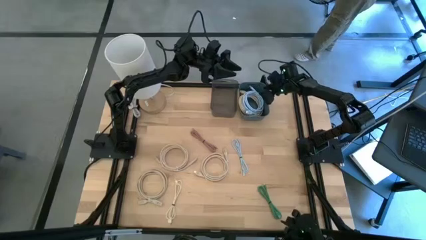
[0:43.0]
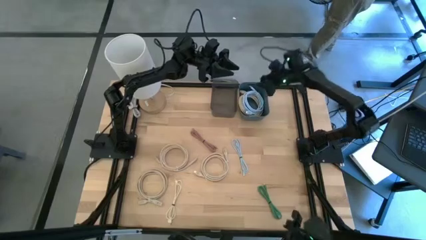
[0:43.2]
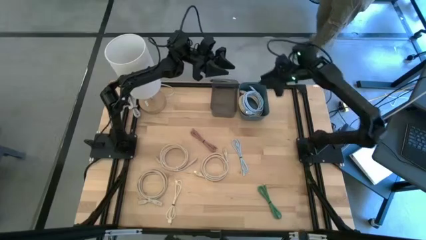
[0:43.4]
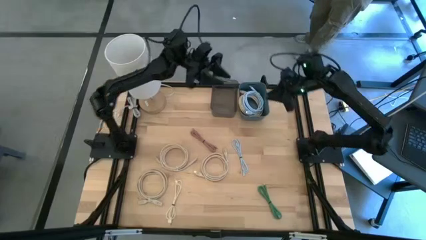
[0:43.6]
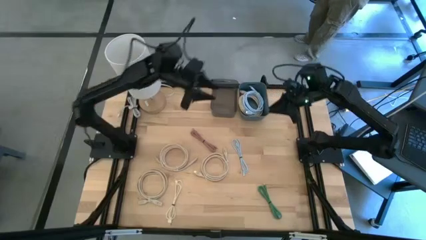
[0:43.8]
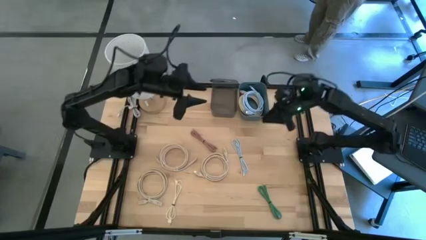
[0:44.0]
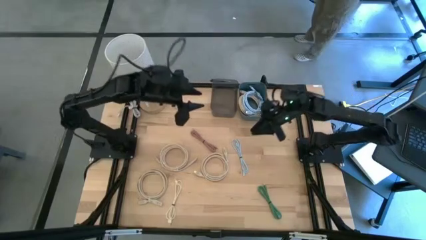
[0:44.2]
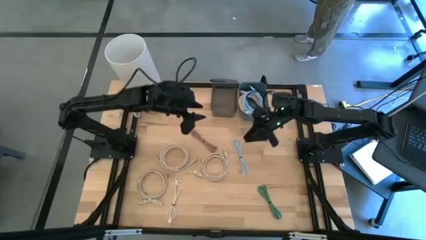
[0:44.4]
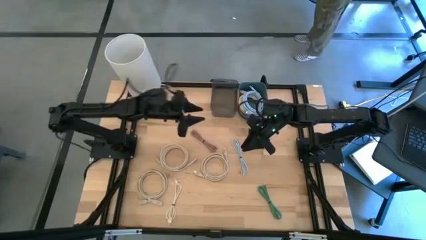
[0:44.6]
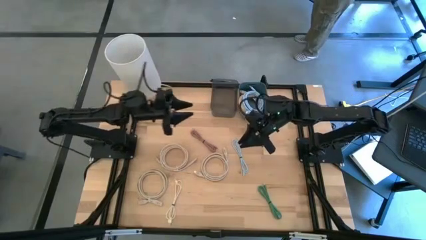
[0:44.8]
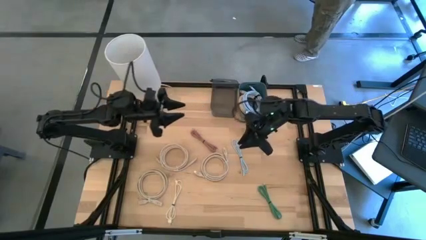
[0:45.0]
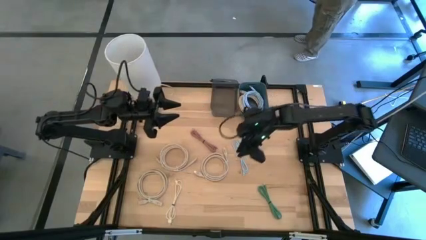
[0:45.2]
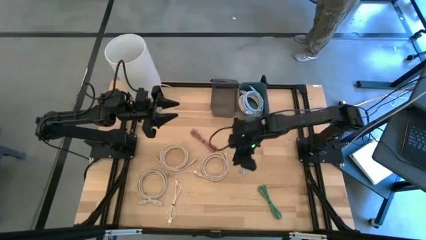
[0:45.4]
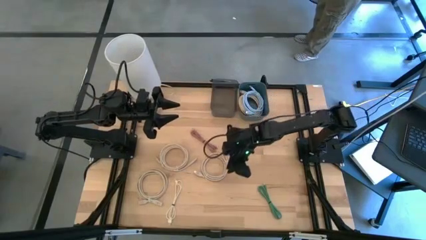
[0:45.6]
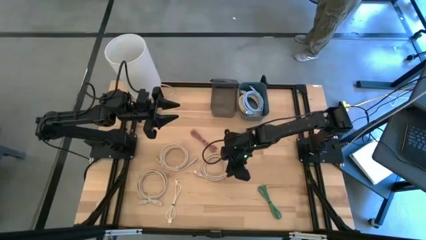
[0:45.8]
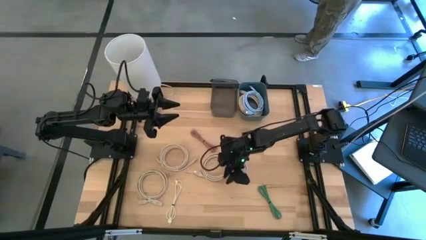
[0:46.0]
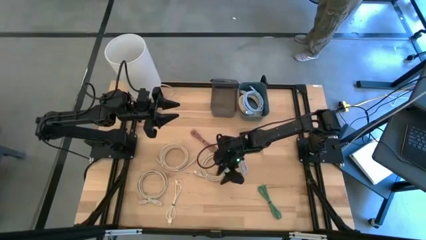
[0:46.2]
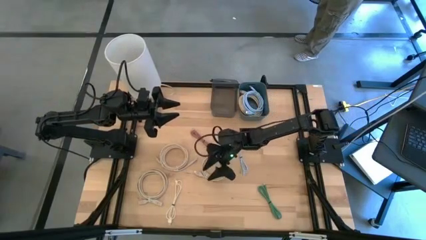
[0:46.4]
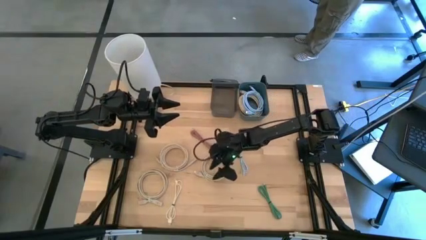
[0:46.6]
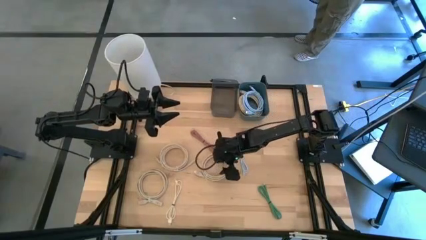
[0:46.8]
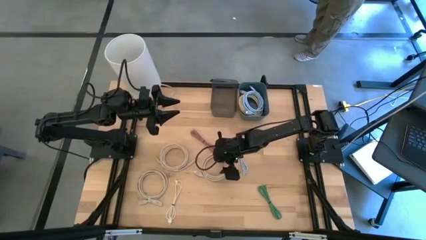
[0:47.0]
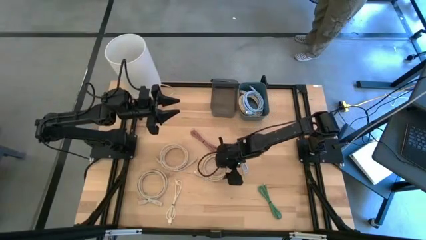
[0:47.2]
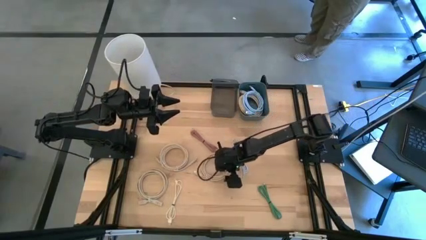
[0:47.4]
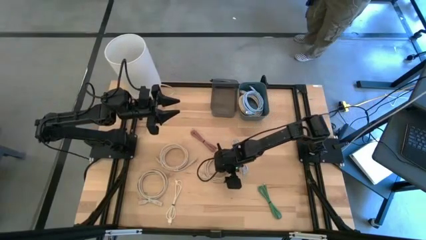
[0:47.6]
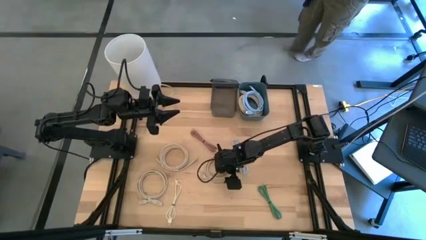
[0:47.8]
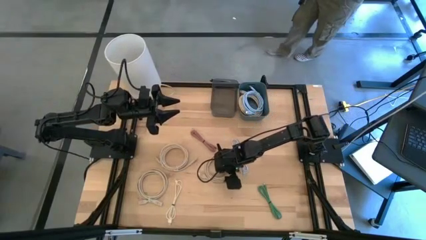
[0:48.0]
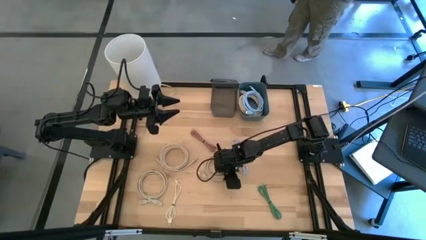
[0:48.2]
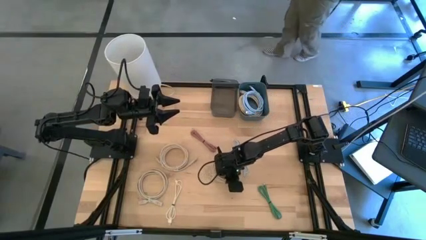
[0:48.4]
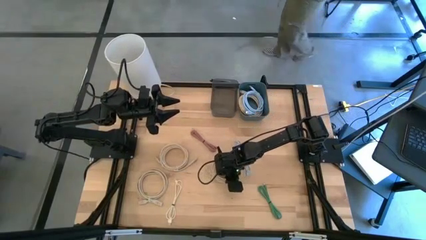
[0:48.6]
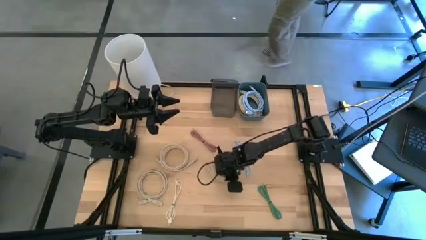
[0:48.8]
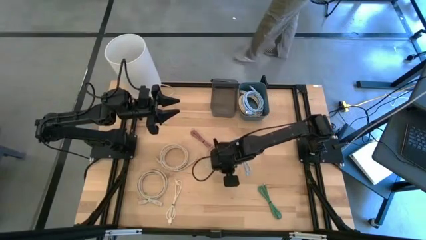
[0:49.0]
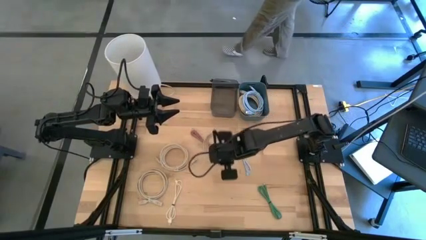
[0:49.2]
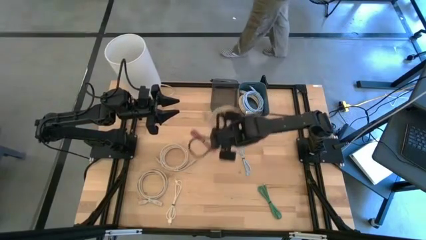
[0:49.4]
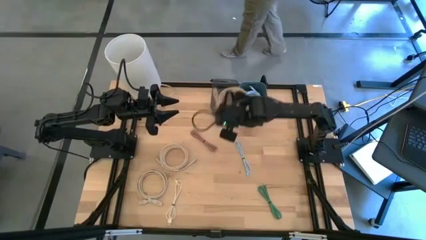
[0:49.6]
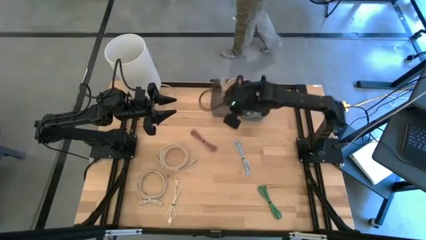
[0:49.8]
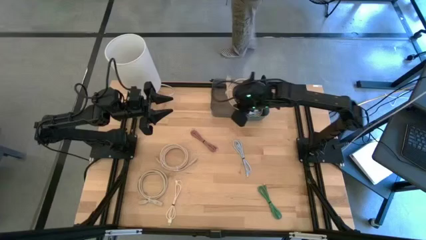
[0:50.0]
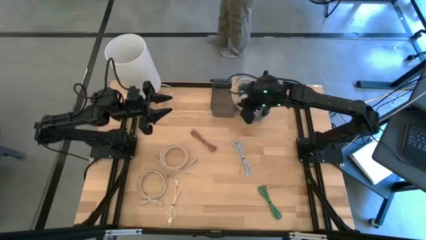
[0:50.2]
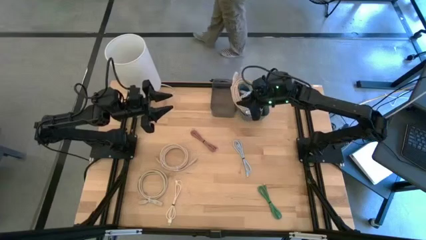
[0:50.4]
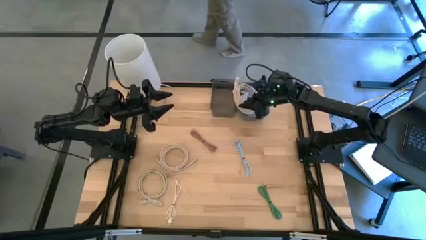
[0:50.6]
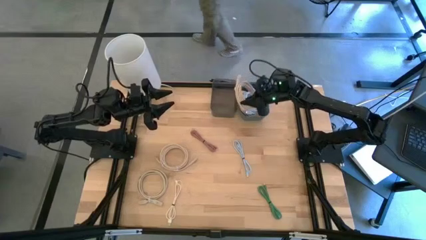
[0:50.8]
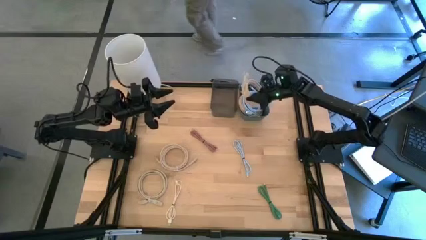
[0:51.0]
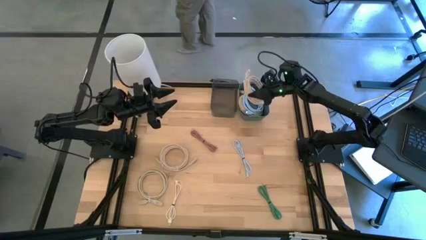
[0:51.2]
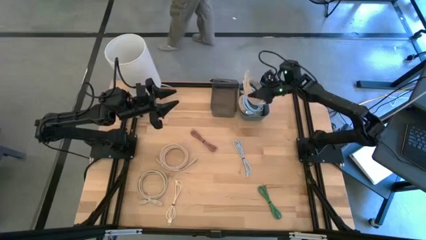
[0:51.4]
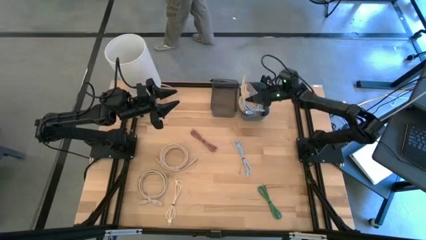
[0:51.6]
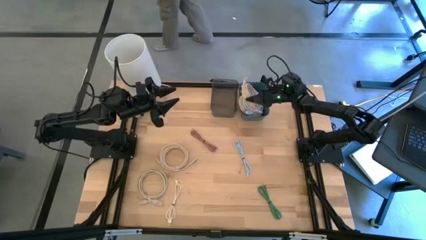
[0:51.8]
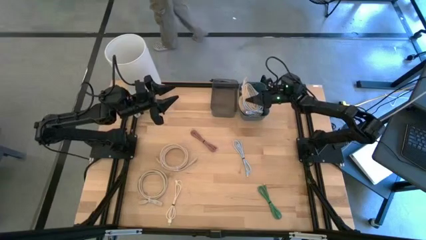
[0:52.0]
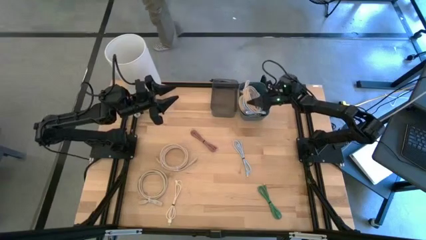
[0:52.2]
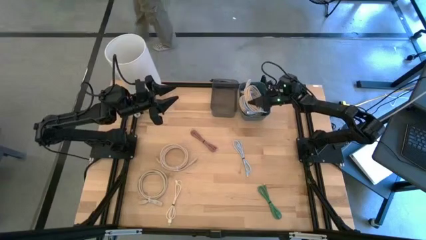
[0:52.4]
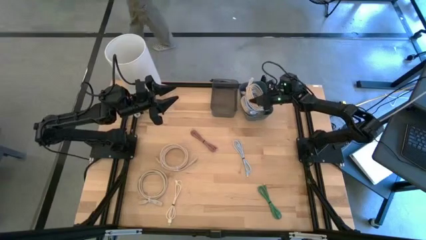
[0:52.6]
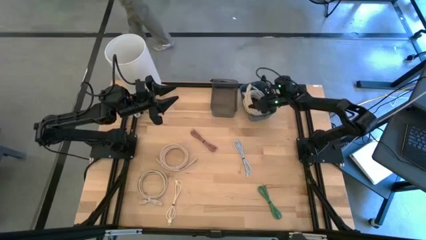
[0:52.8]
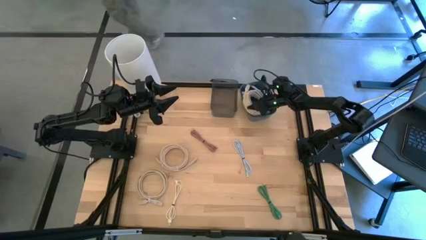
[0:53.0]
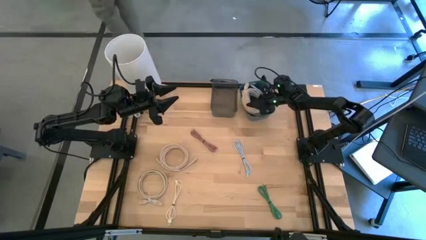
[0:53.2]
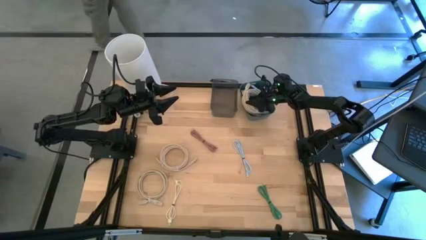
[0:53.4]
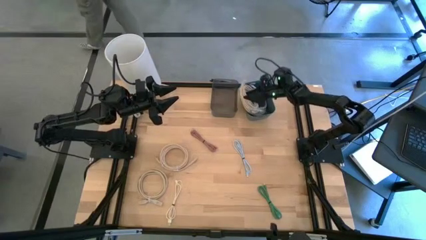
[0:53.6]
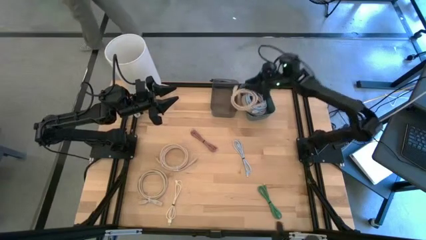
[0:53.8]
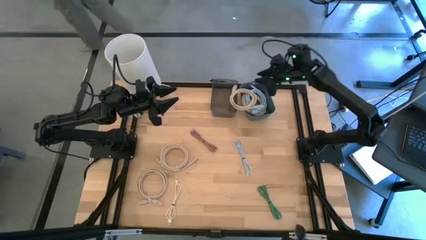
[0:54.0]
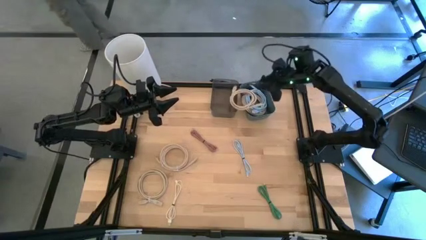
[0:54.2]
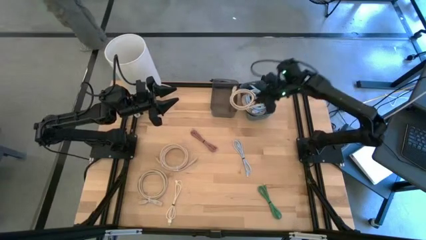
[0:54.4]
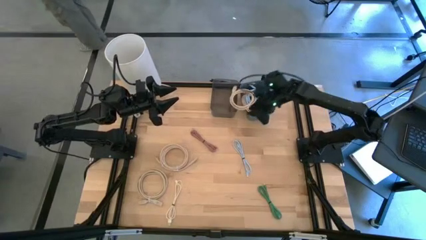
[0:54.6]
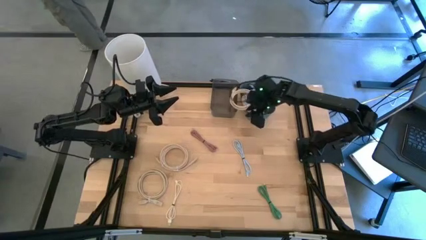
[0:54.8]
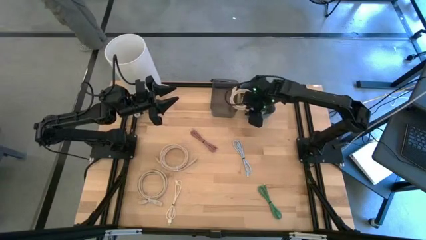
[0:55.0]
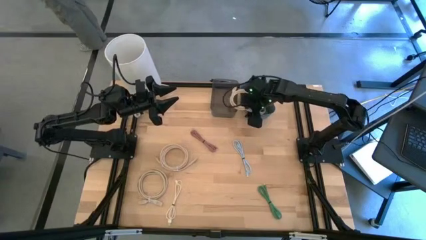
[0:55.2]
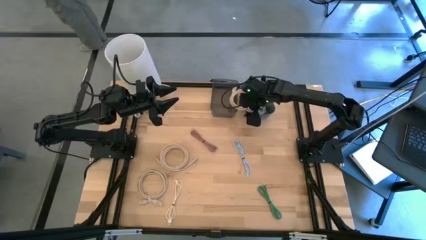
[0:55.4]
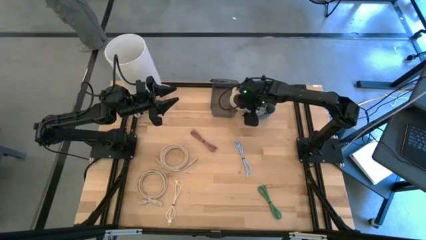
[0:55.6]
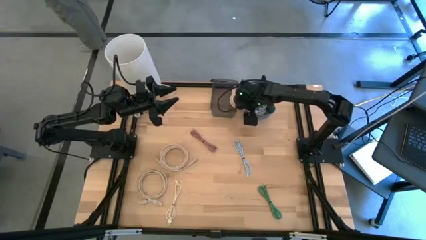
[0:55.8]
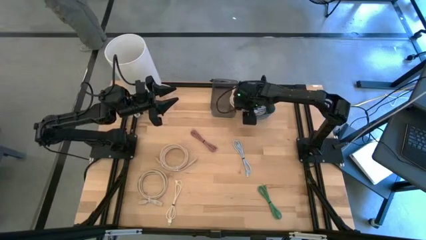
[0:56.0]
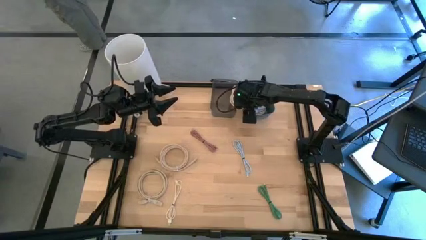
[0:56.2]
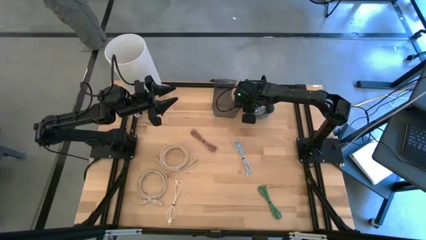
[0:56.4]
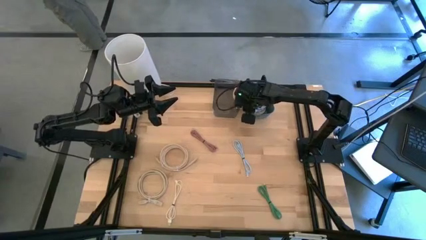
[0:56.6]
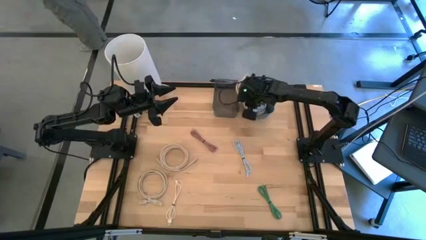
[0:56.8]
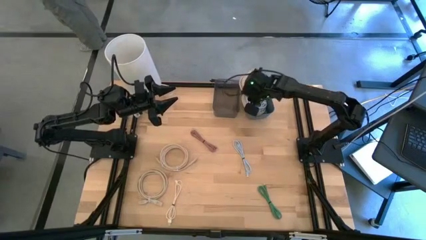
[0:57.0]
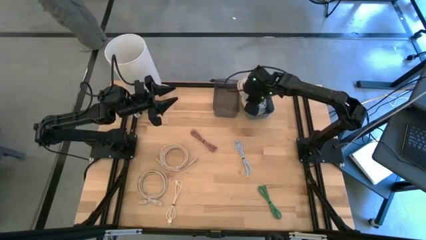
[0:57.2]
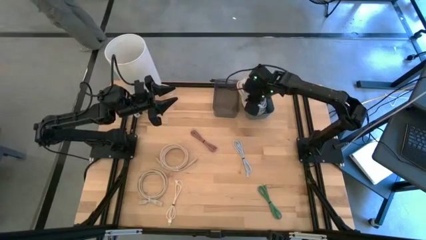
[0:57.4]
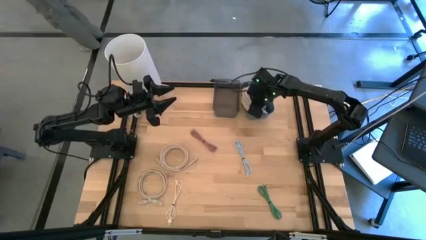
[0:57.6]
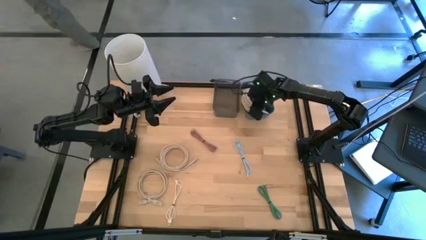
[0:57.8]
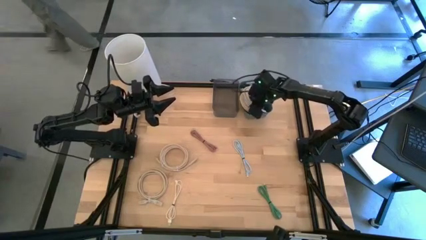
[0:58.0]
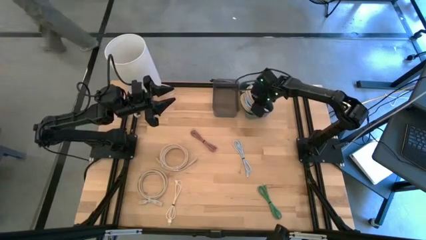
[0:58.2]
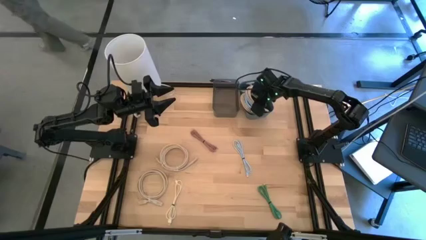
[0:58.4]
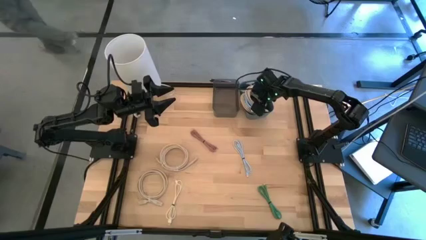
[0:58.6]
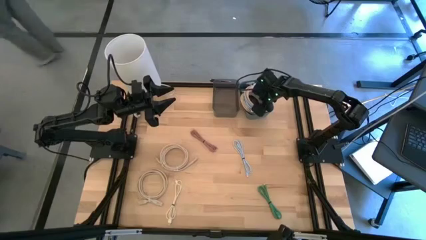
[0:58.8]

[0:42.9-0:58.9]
Put the light brown HDMI cable into the blue bin
